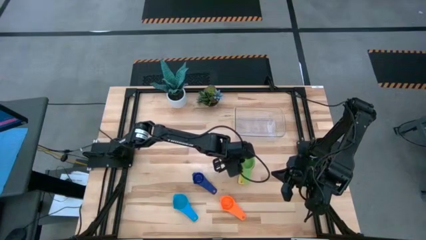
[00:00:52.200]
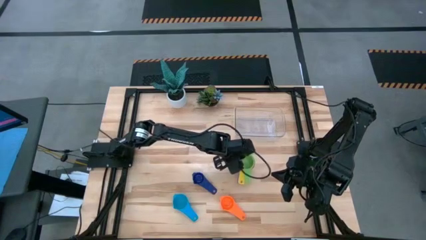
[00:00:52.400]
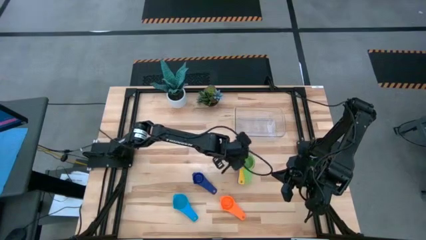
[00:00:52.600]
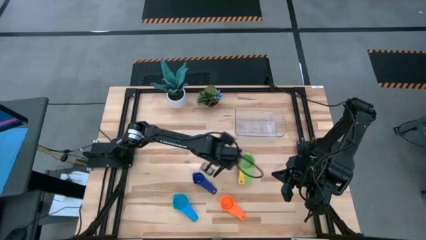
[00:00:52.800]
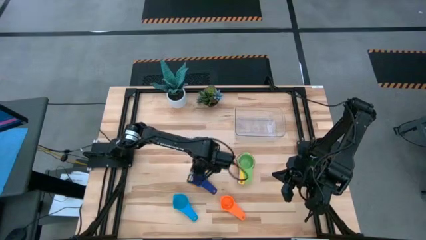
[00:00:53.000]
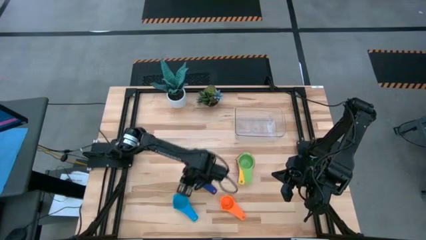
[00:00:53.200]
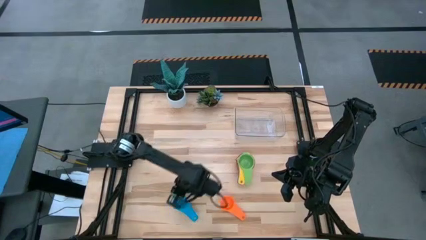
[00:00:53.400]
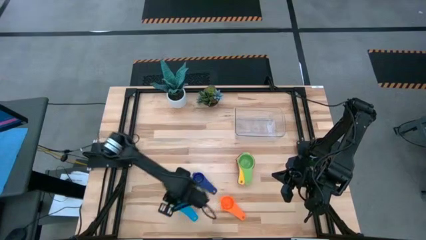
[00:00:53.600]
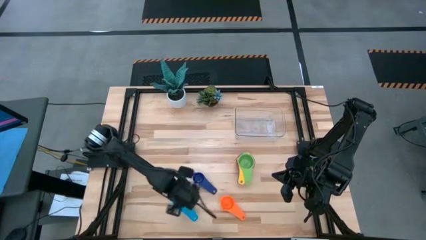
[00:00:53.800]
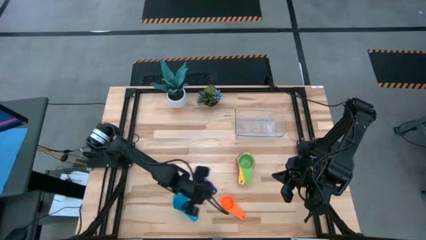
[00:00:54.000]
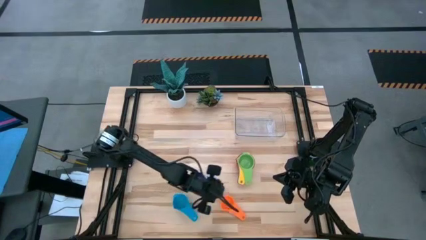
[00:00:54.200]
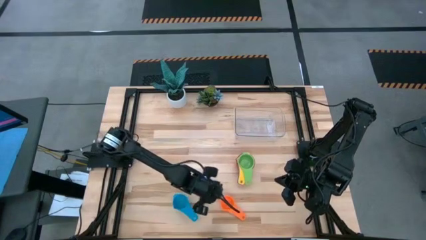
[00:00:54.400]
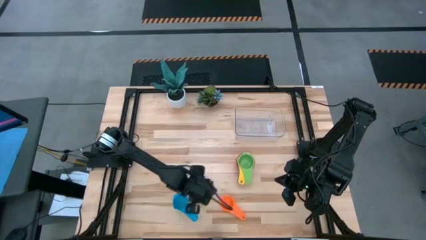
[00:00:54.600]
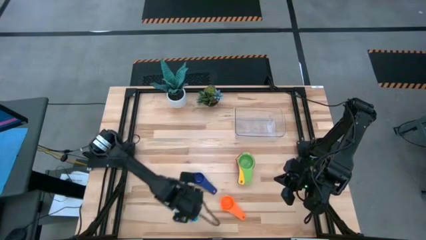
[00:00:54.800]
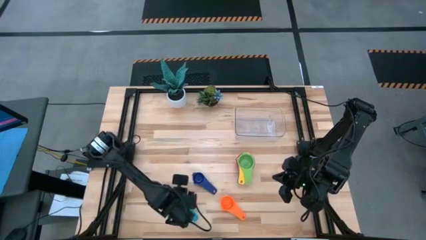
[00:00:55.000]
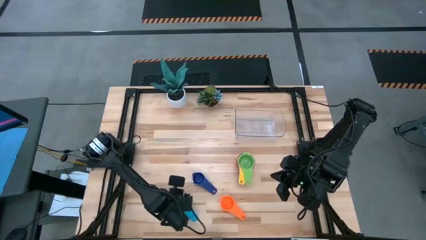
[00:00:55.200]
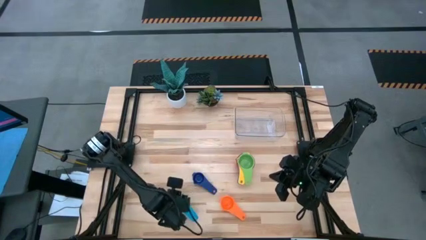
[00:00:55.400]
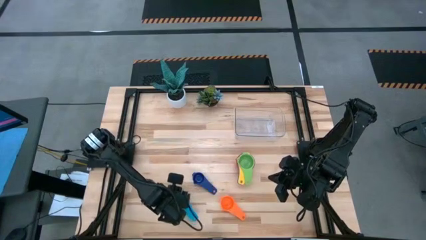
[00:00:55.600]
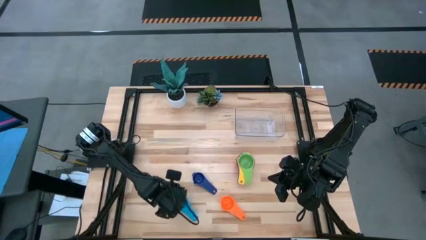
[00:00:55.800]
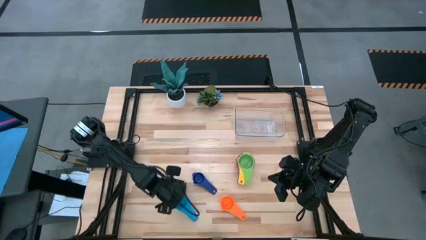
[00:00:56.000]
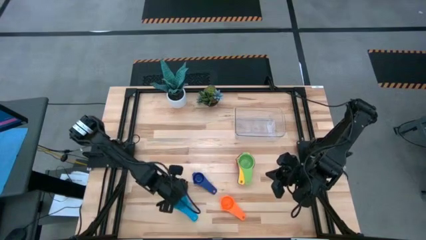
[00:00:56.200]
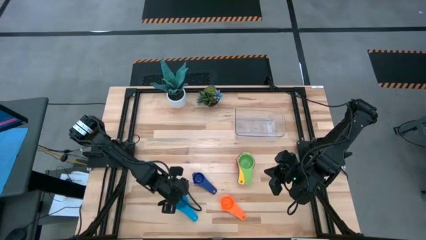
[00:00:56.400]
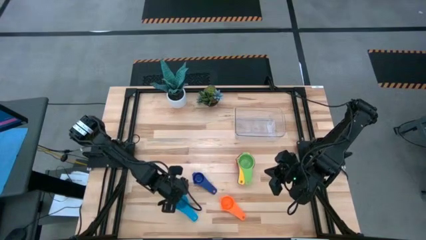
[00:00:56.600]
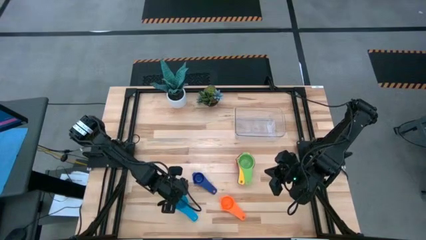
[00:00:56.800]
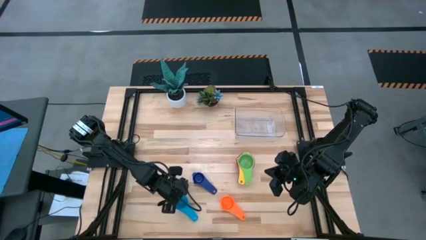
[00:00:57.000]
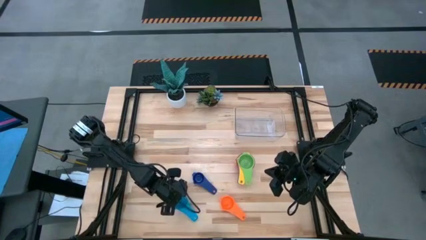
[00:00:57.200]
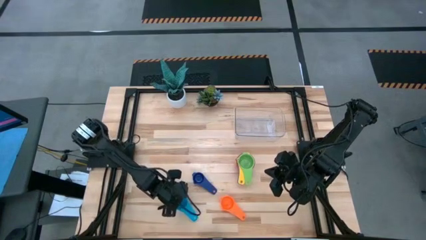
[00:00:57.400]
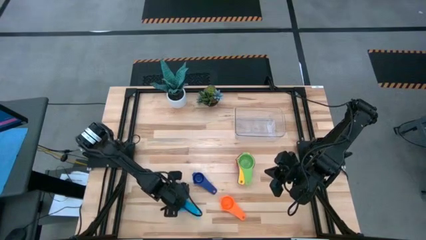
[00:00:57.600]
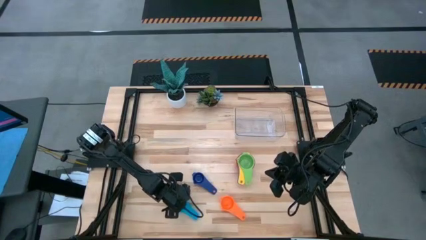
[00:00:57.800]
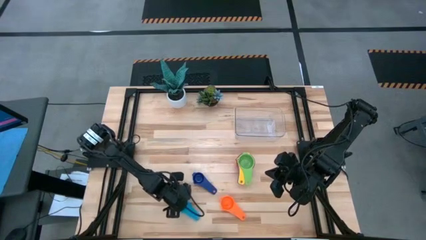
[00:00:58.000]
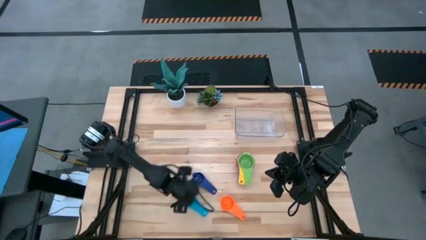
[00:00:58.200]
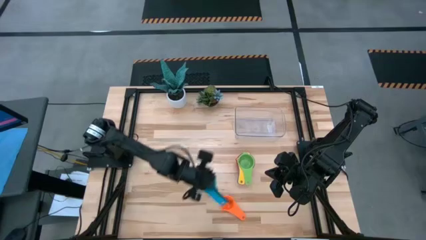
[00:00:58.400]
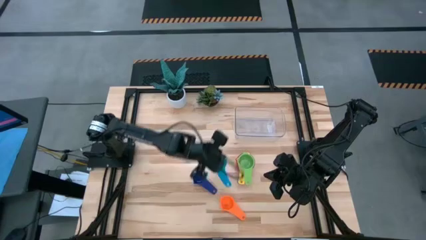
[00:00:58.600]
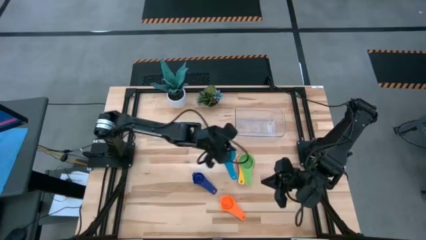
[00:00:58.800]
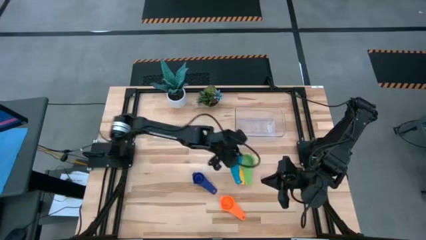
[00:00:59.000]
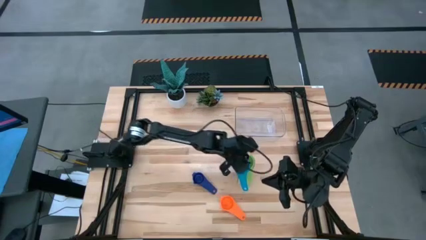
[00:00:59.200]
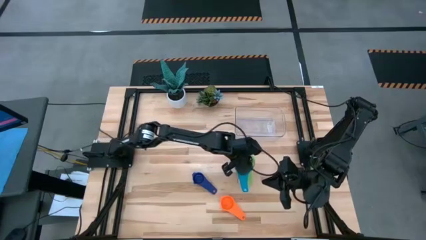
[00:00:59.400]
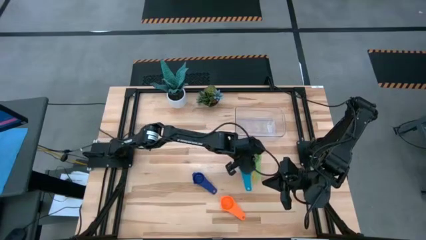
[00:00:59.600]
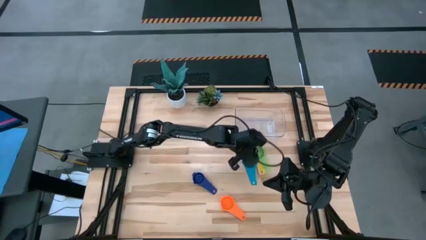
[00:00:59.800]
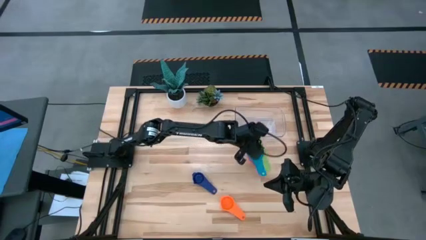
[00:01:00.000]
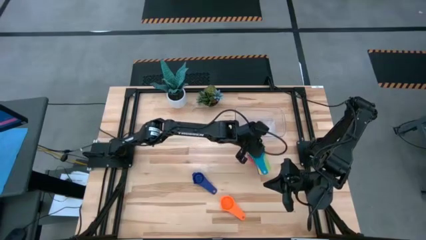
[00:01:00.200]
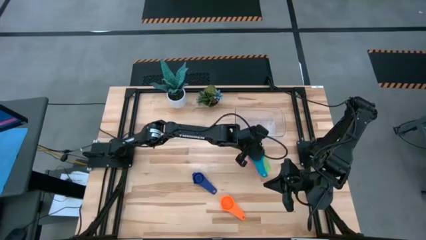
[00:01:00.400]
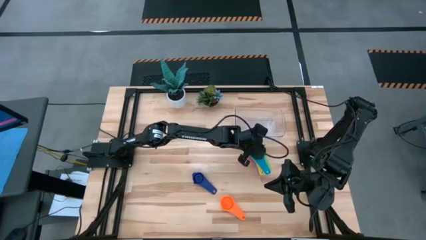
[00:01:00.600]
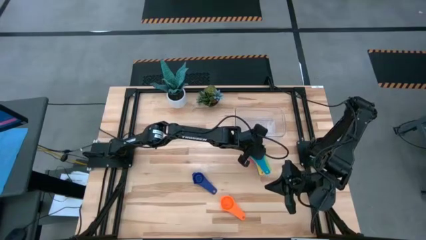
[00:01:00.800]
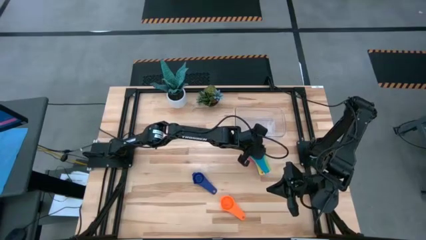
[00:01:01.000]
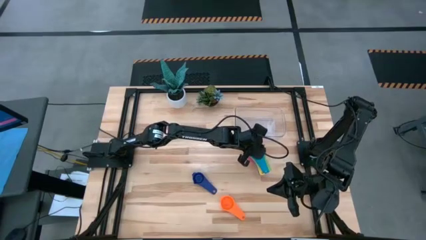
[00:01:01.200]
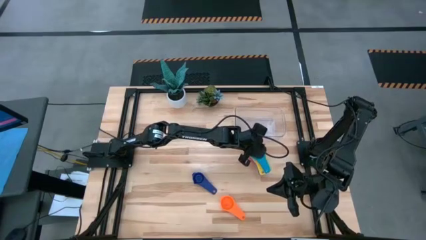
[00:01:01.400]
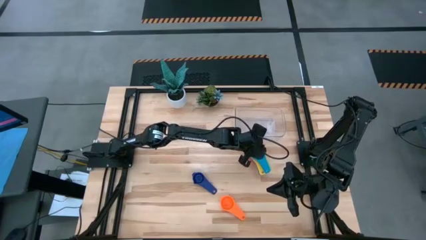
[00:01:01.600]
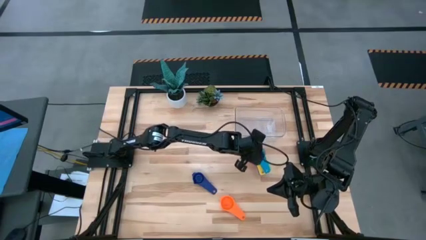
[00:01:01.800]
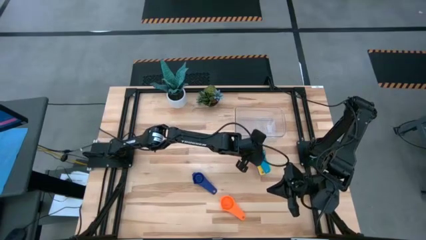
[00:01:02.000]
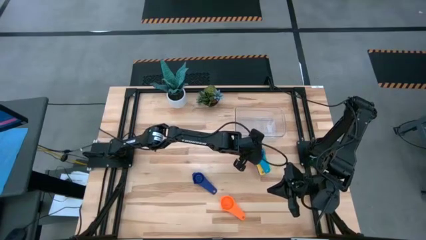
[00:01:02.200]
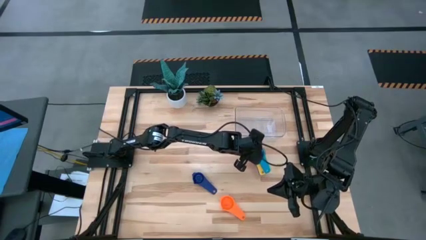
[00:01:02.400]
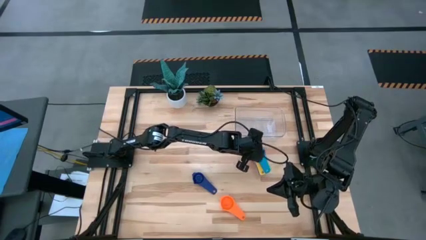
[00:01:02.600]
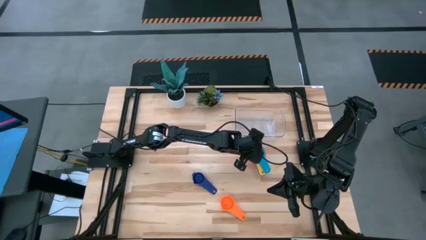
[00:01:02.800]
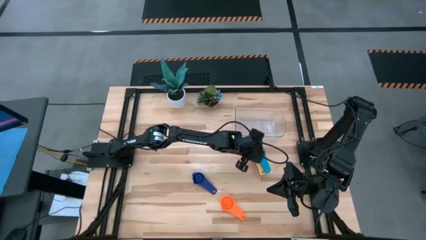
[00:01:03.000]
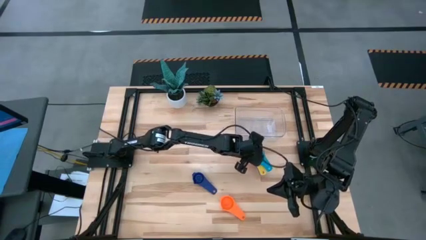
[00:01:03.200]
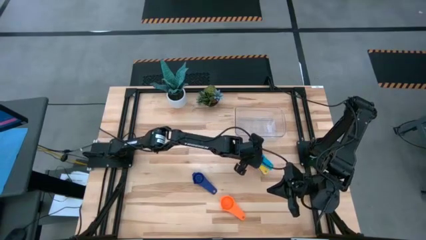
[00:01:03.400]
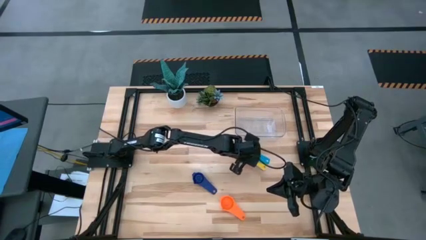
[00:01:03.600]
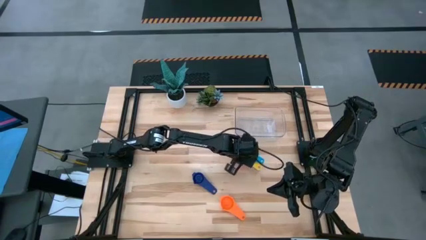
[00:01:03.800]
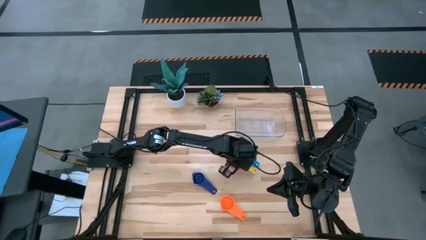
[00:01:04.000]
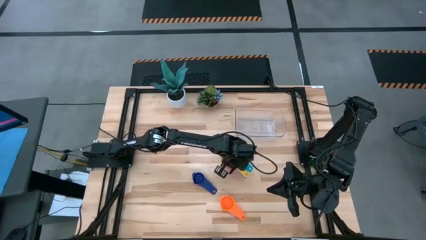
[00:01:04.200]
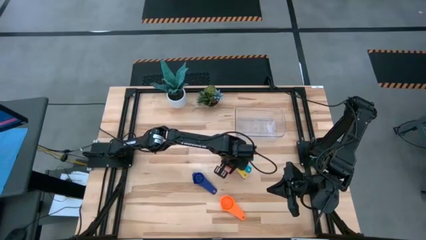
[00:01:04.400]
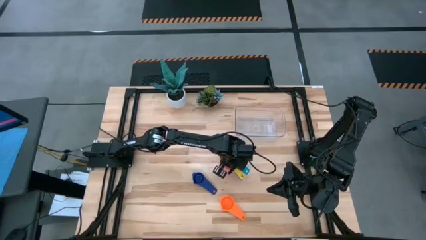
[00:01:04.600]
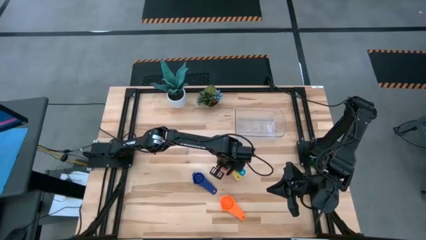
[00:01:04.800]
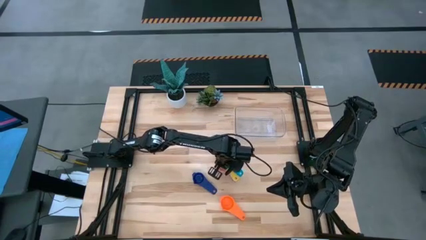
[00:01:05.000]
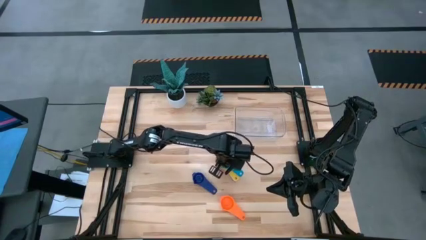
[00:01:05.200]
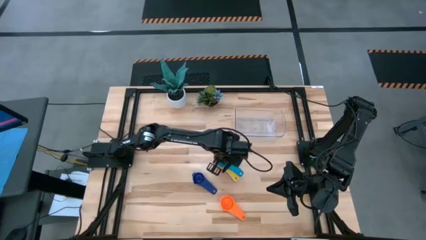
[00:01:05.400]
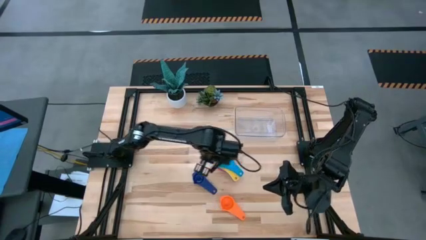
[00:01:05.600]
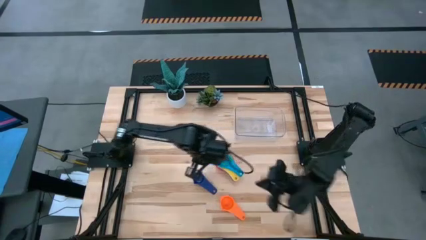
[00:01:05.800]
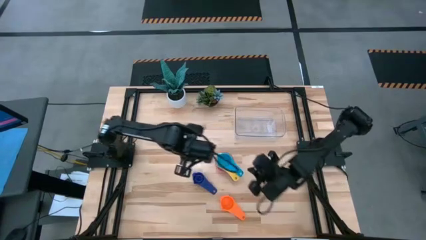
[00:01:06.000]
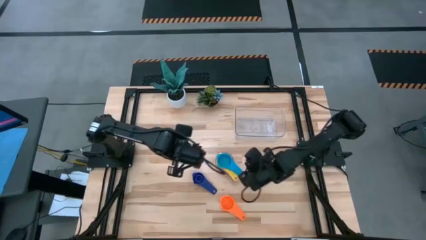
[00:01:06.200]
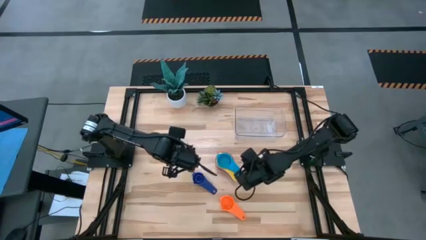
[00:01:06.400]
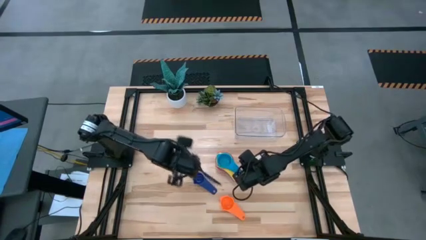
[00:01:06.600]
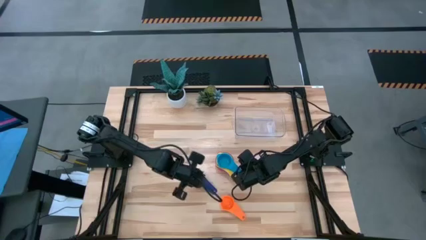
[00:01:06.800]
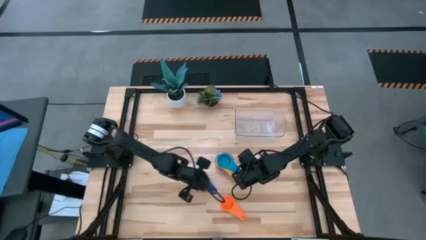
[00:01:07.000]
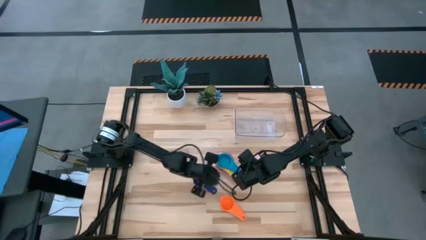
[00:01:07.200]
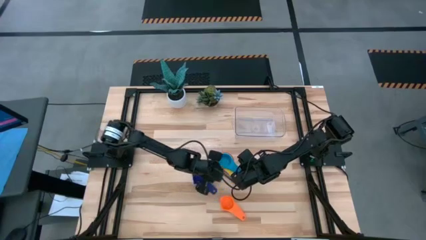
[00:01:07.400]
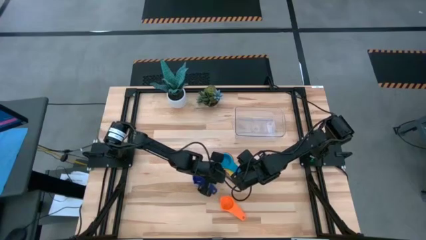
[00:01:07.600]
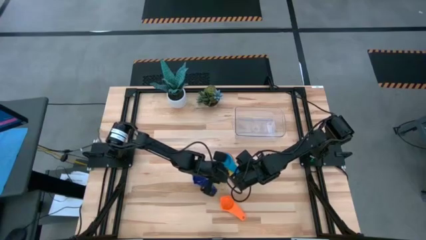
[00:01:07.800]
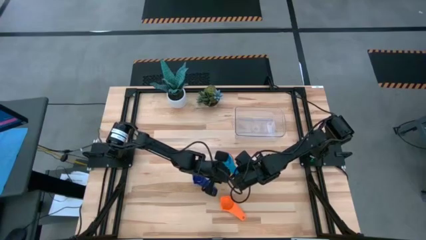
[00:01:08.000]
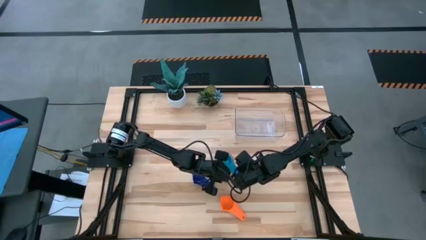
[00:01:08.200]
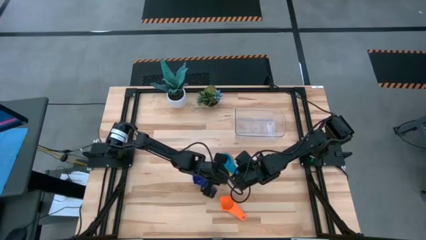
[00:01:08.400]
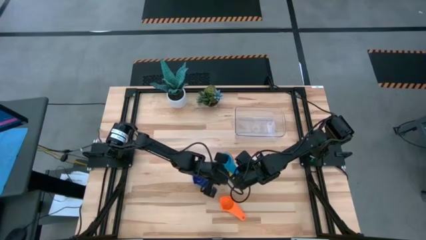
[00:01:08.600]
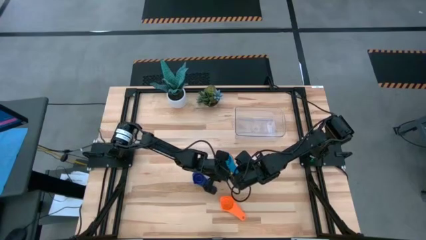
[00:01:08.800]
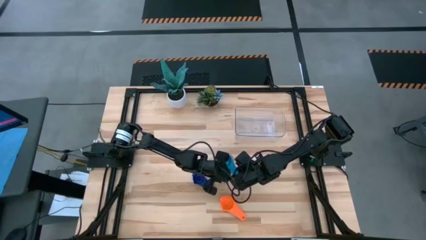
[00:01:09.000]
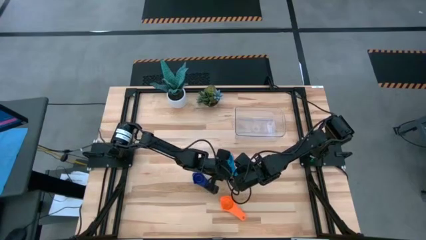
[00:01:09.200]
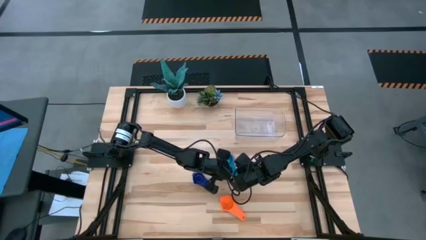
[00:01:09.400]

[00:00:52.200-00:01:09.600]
Task: Nest measuring cups in basket
Stack the light blue measuring cup on top of the green measuring cup

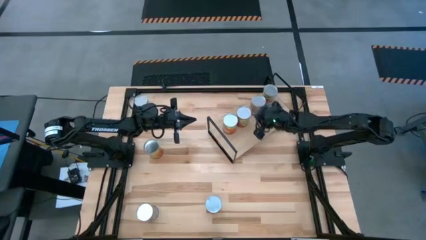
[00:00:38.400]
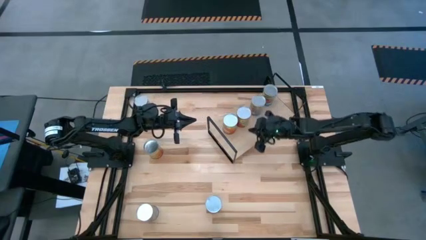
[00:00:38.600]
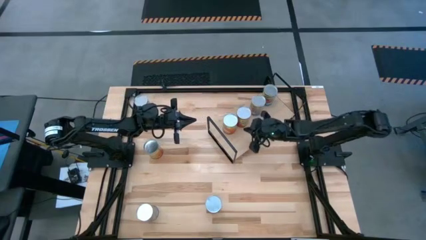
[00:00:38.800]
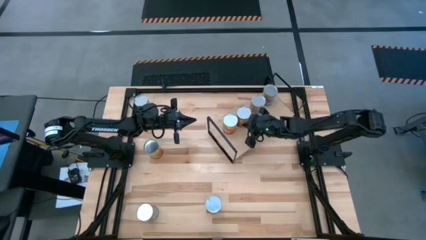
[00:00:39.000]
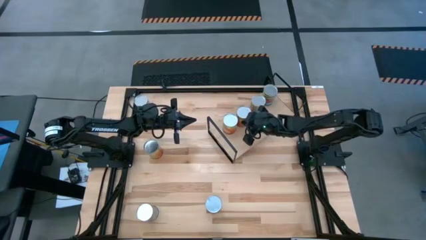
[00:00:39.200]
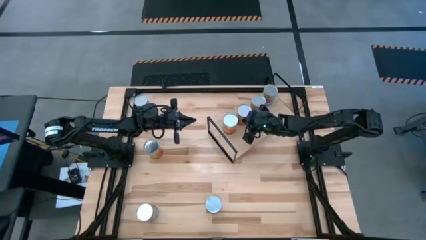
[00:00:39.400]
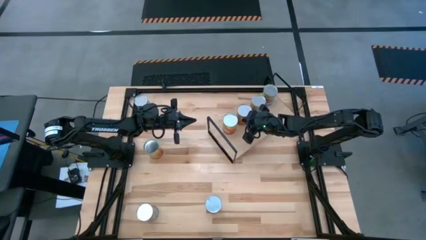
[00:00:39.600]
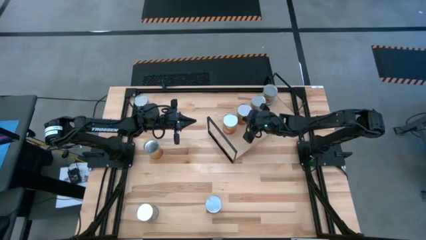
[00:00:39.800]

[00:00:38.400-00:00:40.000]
Task: Pick and place cans onto a shelf
Adjust the canned green beans on the shelf
